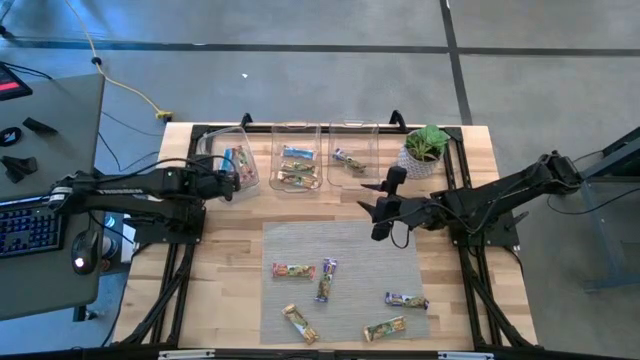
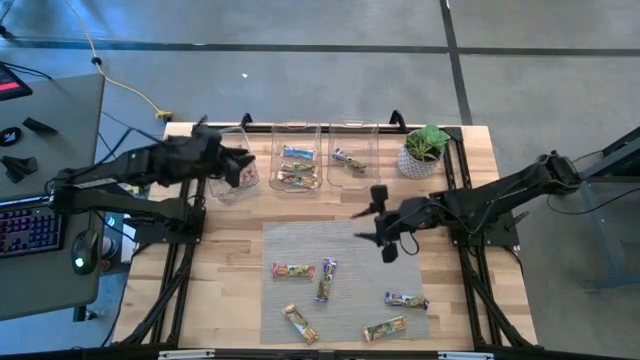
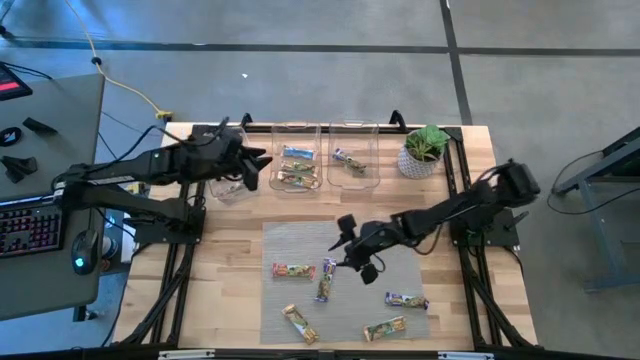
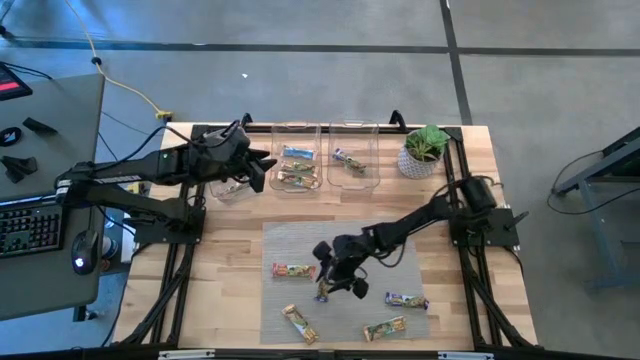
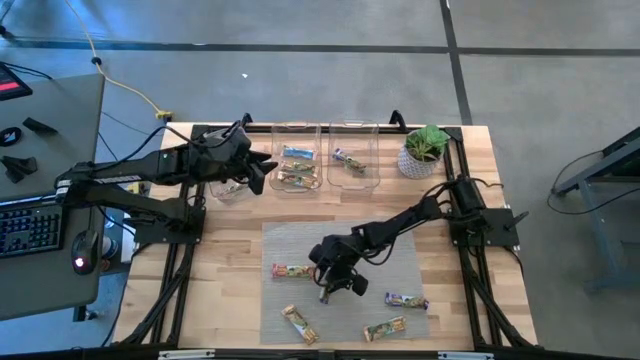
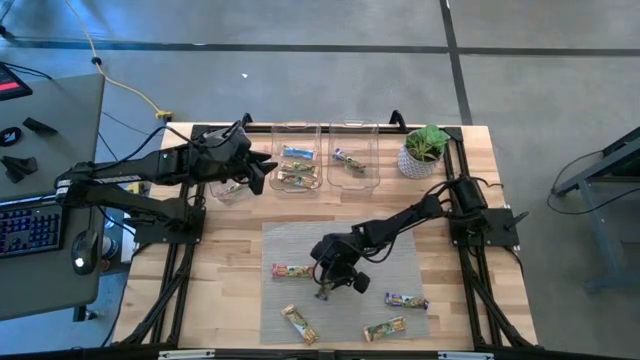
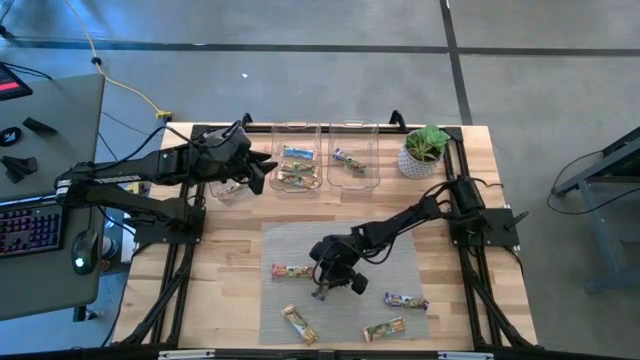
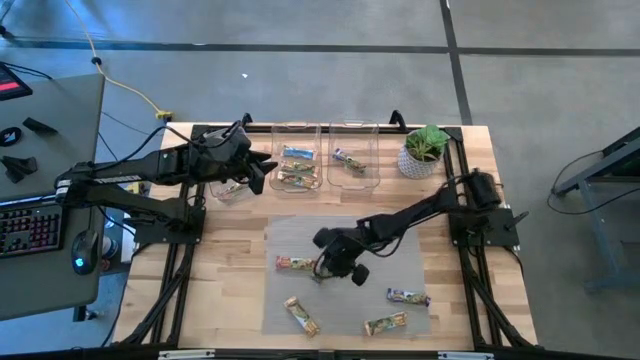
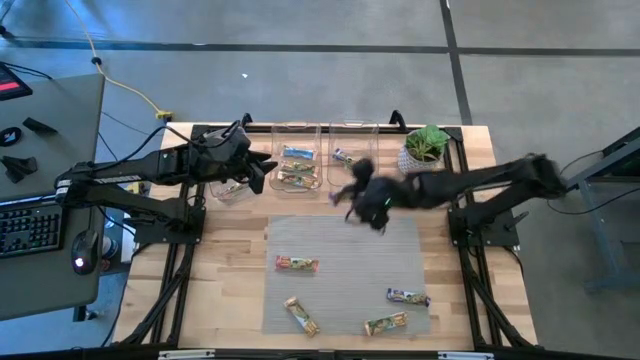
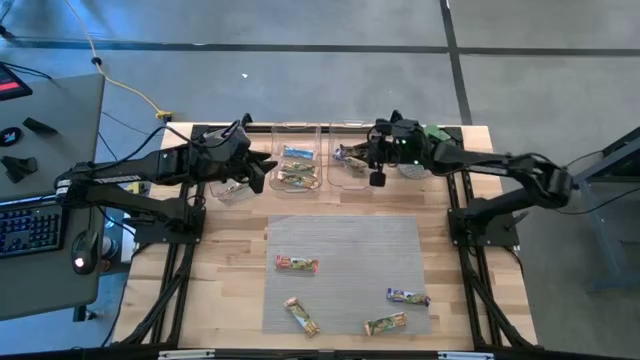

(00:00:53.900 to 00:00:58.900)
Task: Pick and place Granola Bars by type
Put the blue granola bar into the right transparent bin

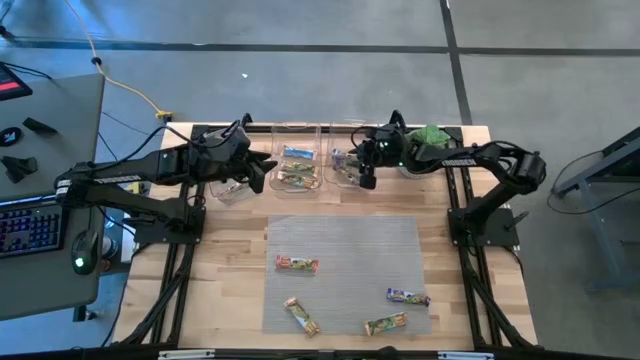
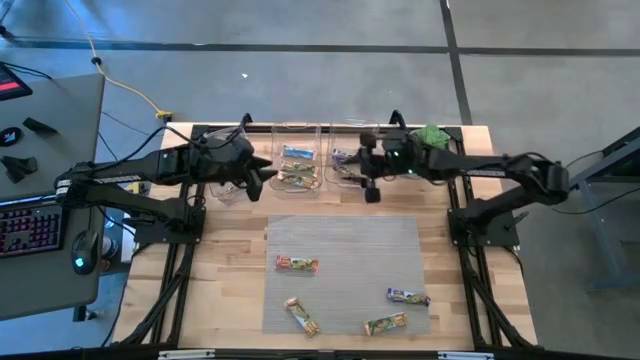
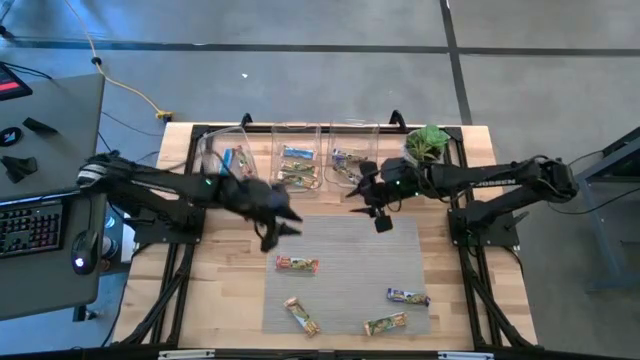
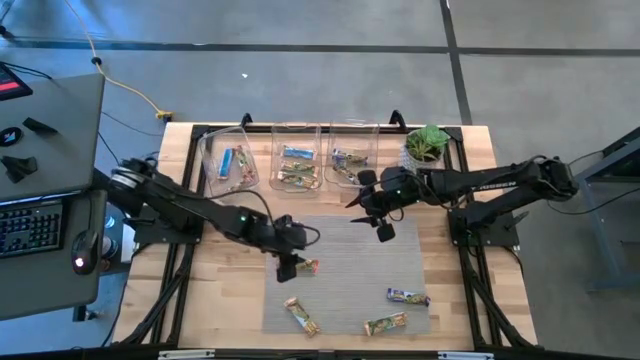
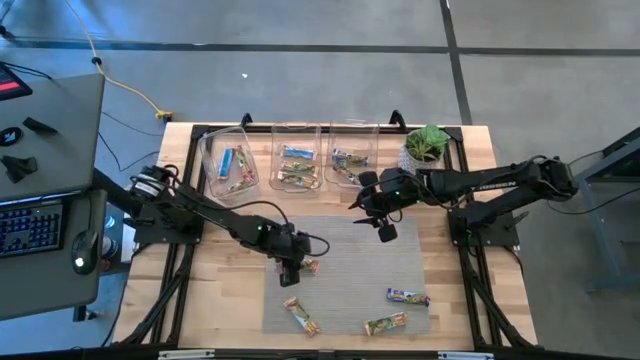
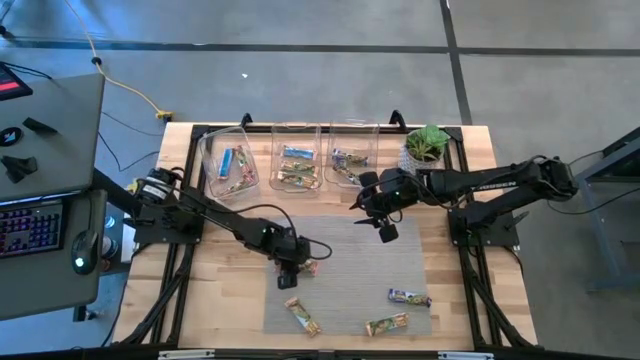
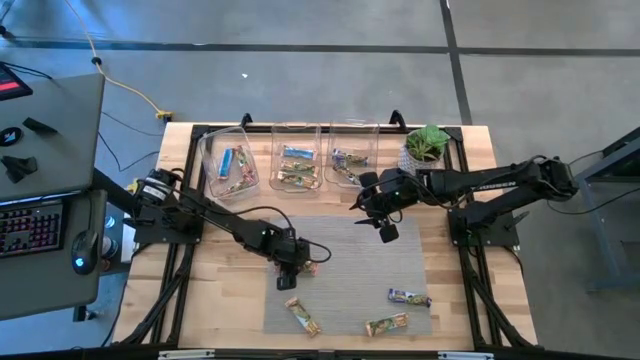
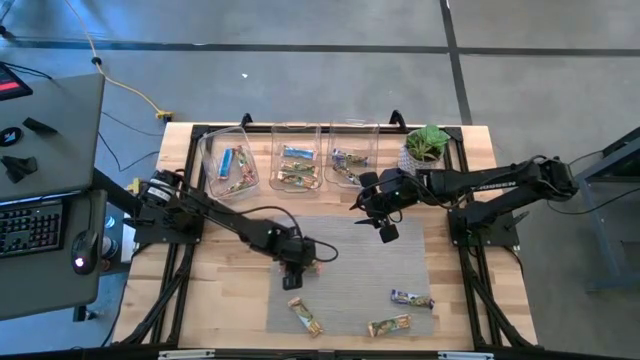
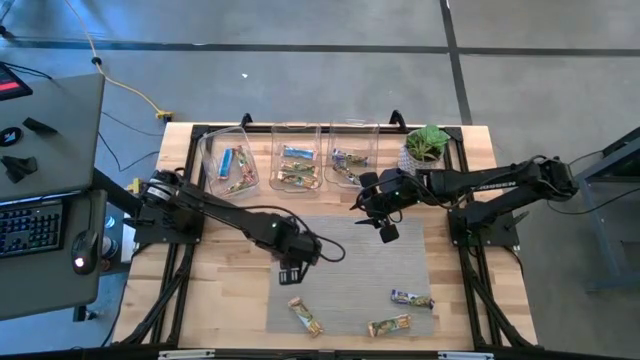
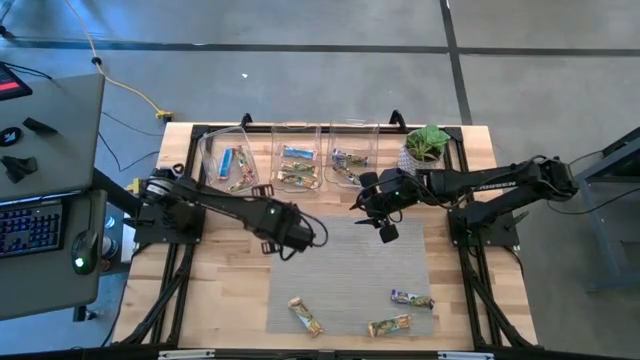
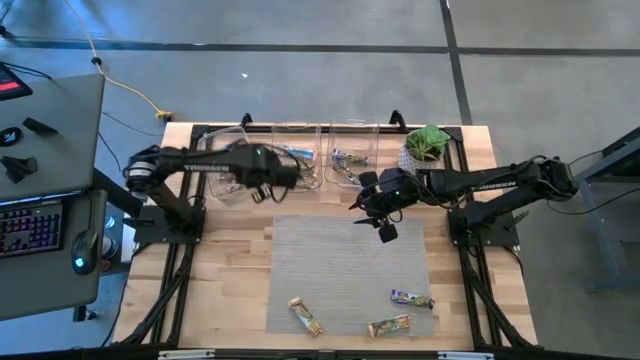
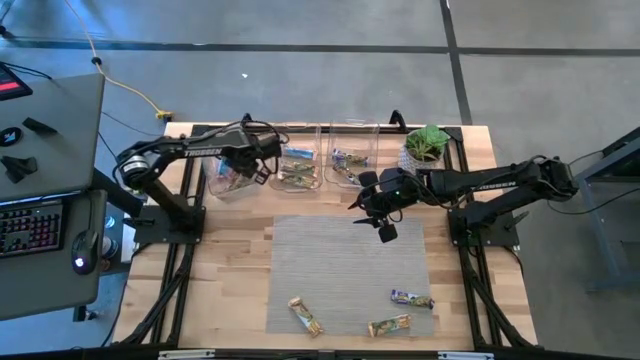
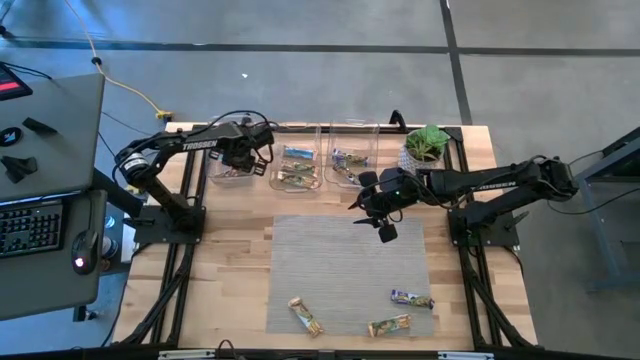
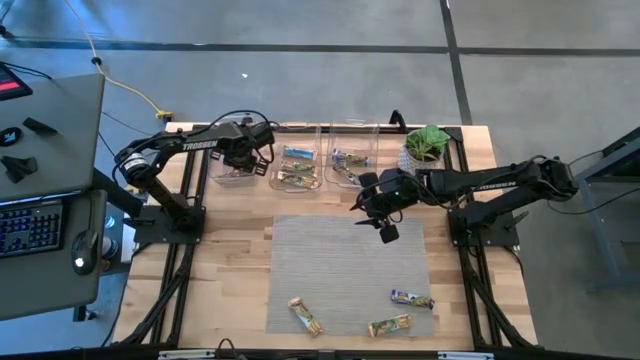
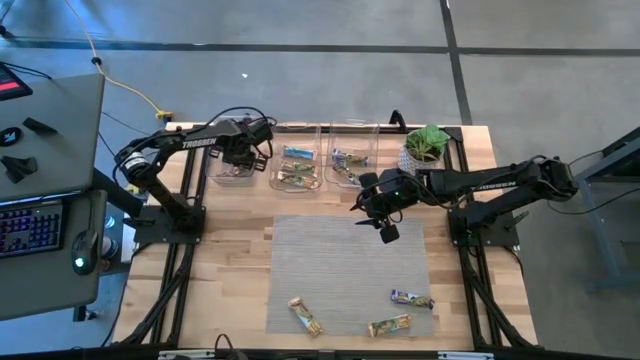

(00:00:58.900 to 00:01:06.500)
Put the red granola bar into the left transparent bin

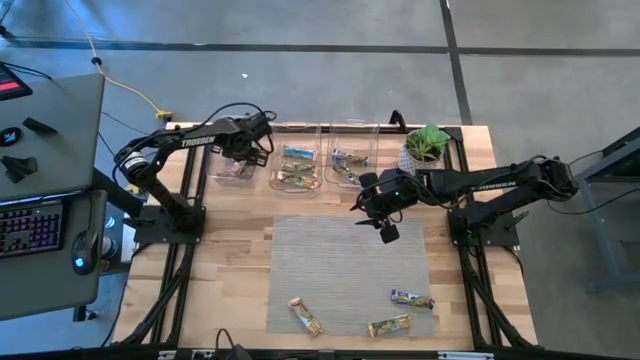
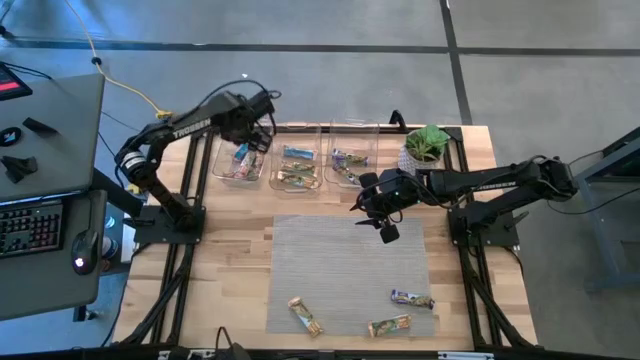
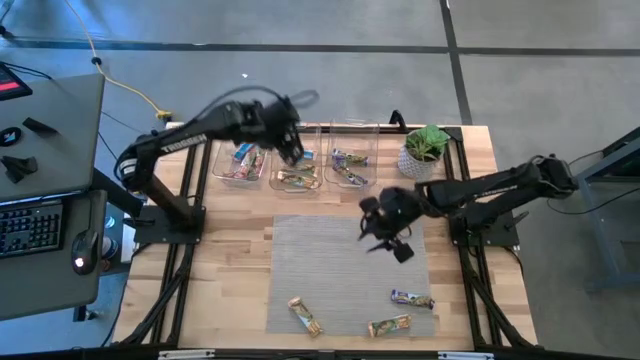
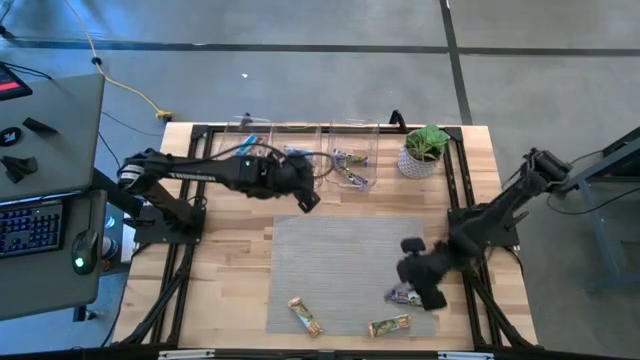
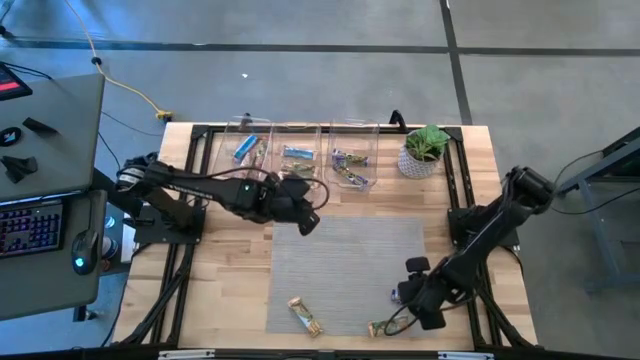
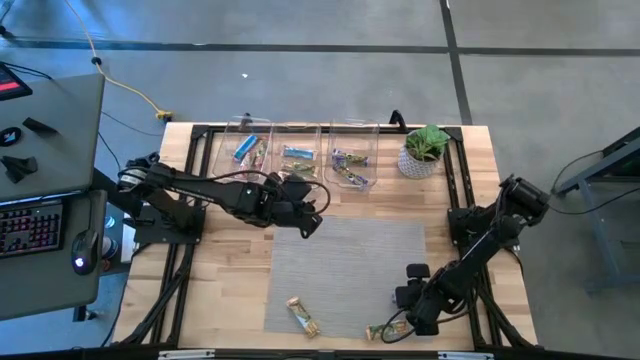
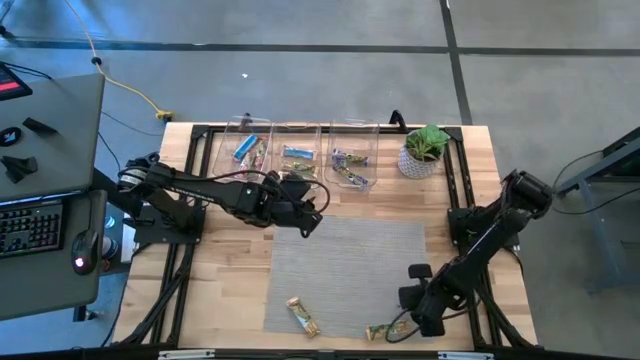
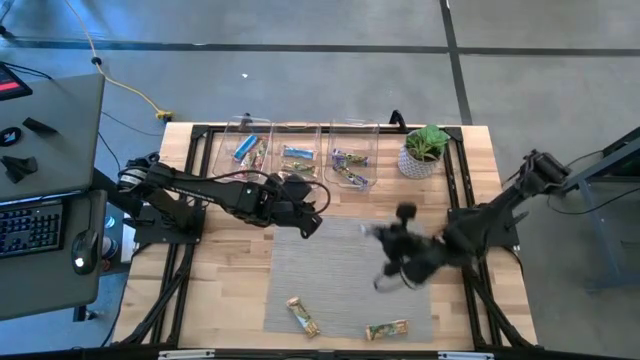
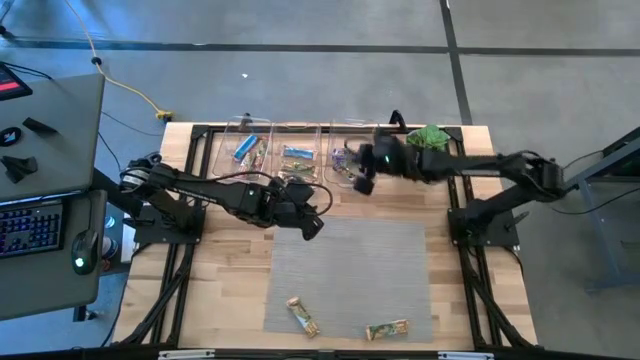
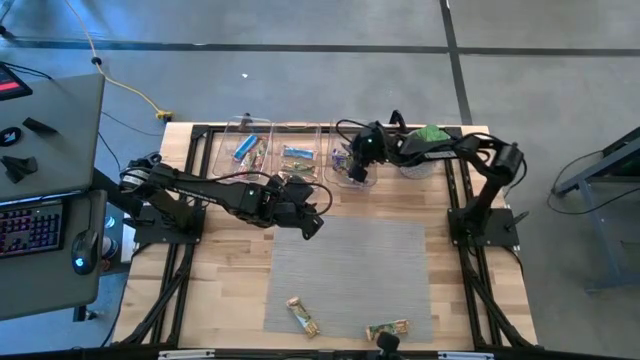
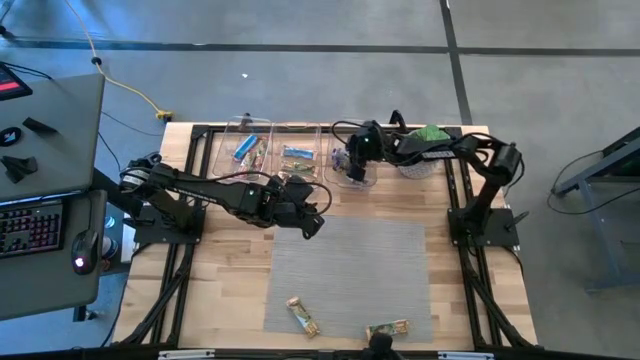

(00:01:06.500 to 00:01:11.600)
Put the blue granola bar into the right transparent bin

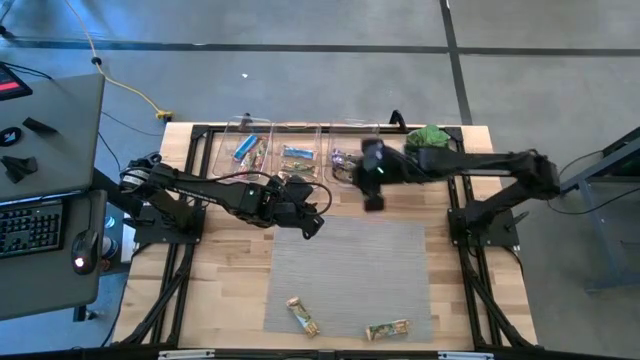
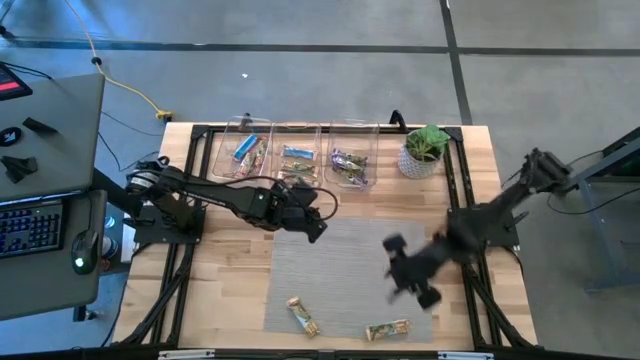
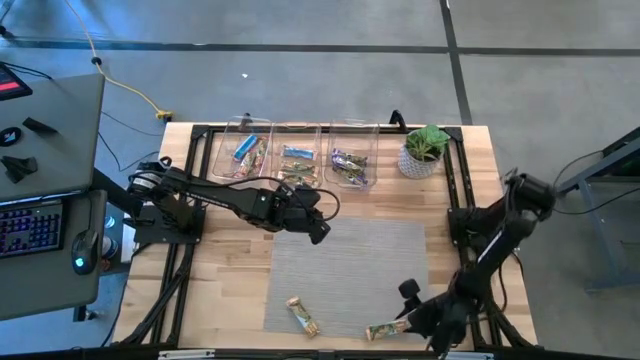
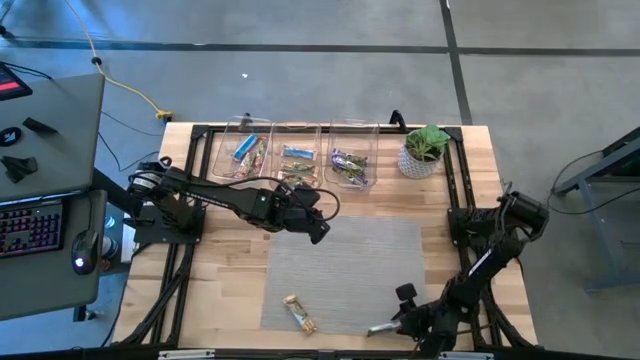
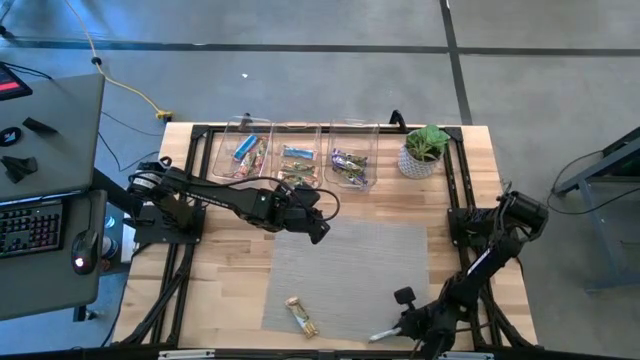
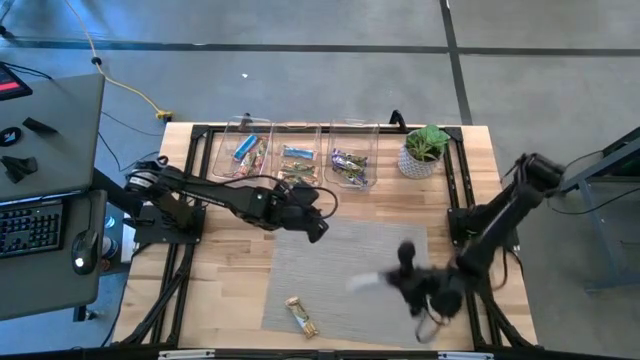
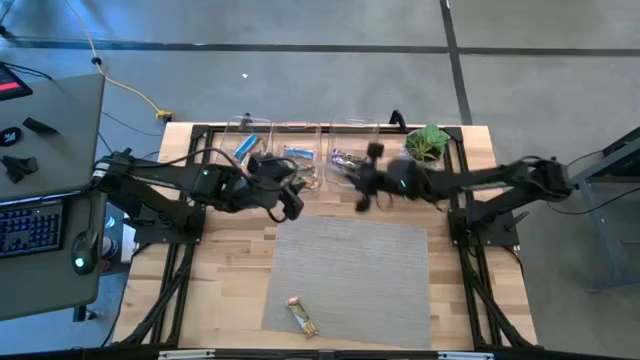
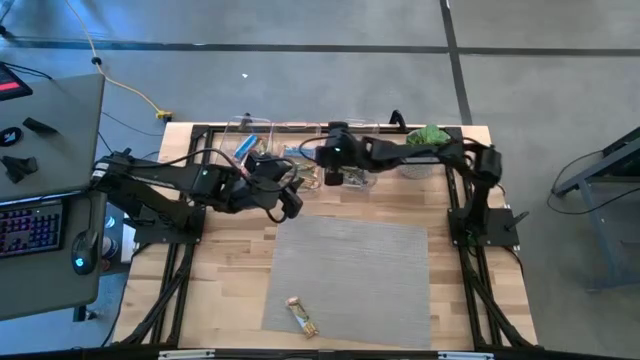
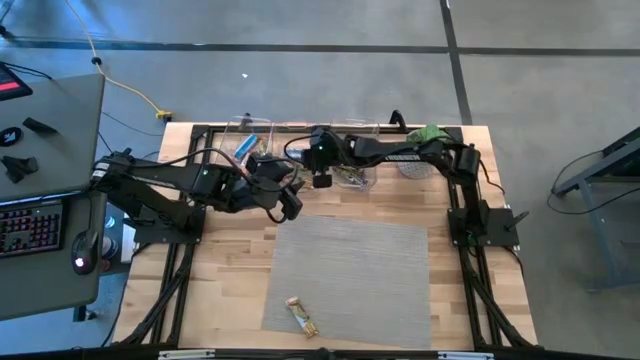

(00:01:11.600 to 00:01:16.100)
Put the yellow granola bar into the middle transparent bin
